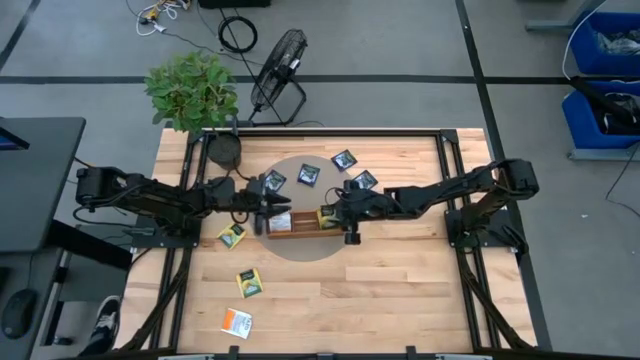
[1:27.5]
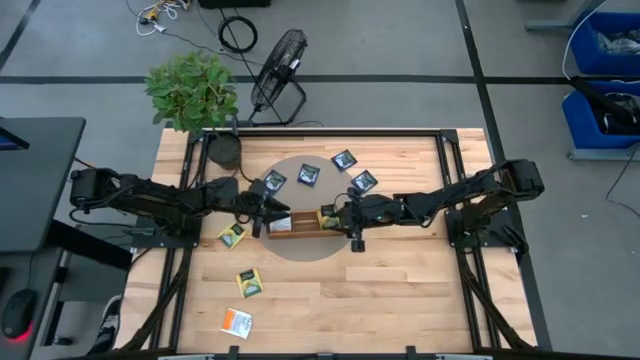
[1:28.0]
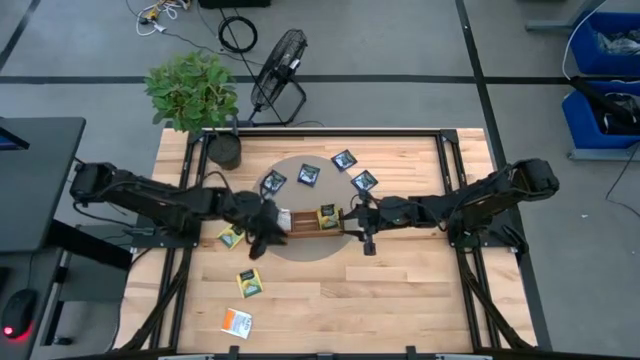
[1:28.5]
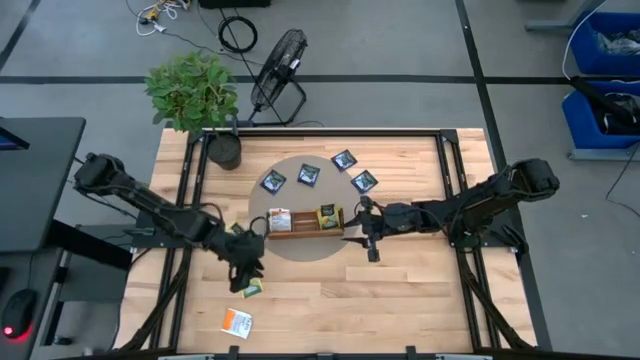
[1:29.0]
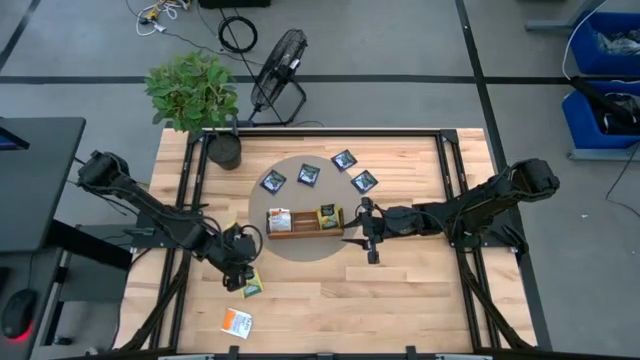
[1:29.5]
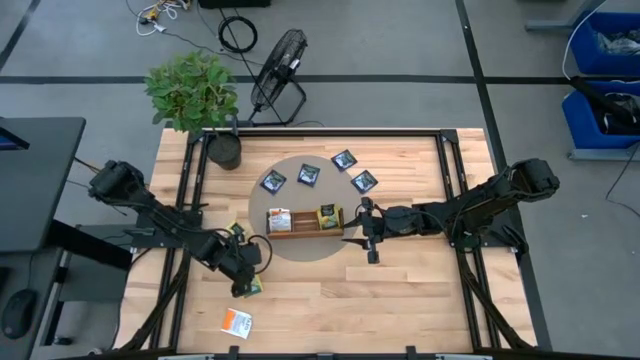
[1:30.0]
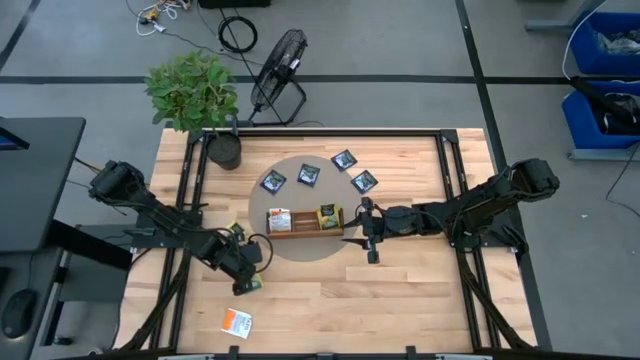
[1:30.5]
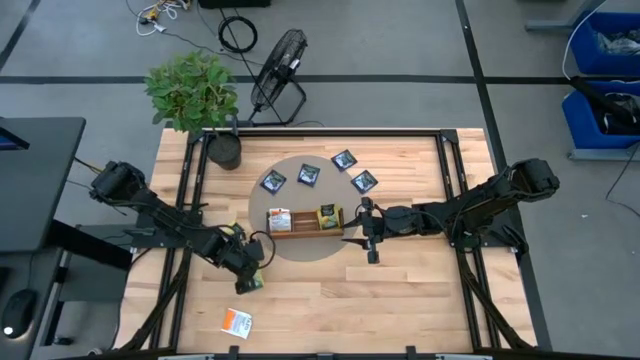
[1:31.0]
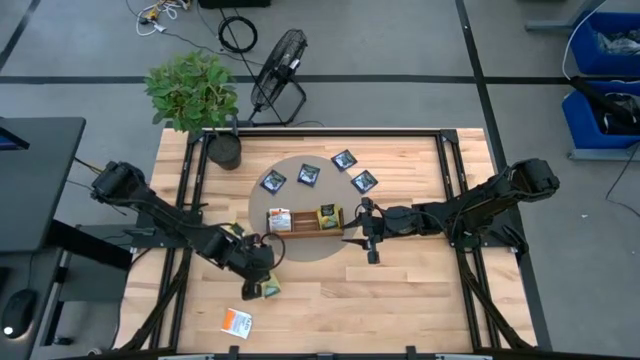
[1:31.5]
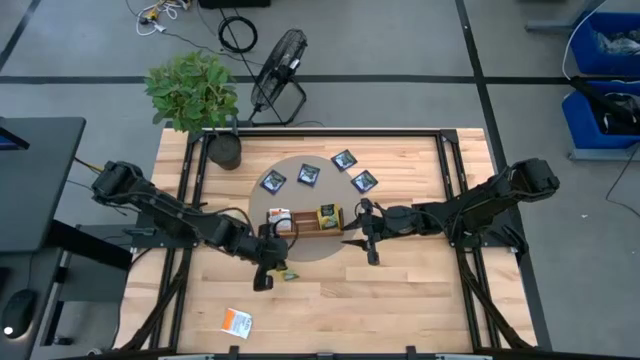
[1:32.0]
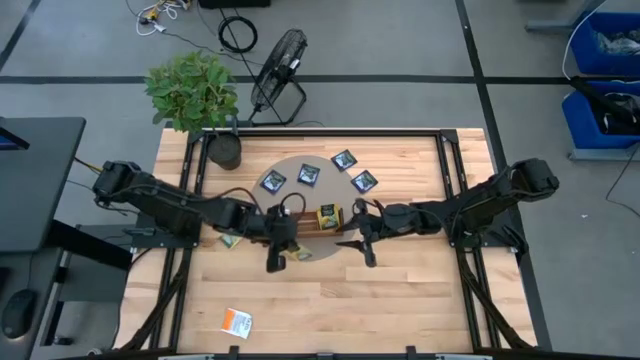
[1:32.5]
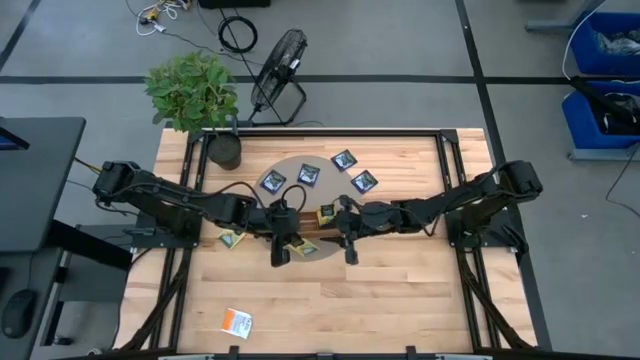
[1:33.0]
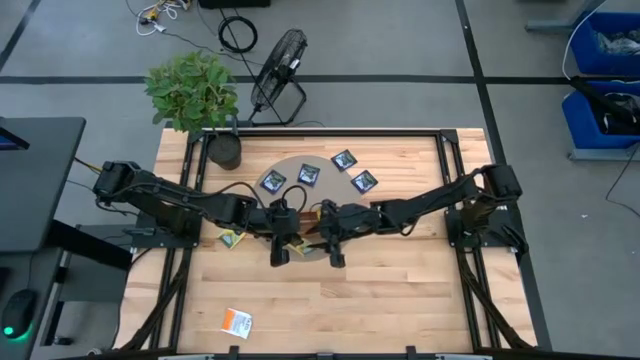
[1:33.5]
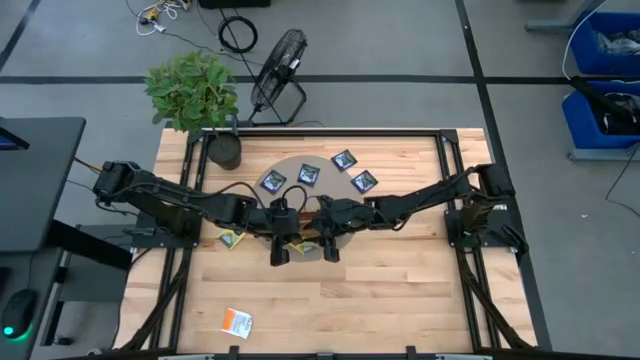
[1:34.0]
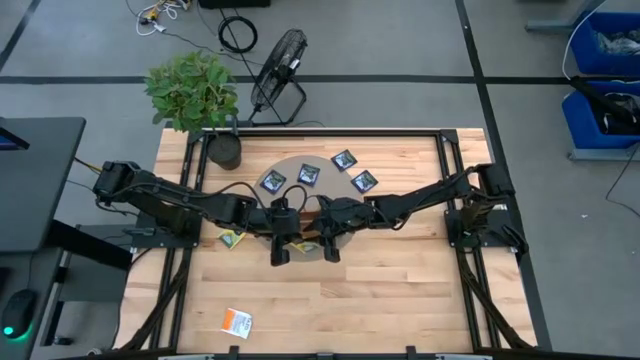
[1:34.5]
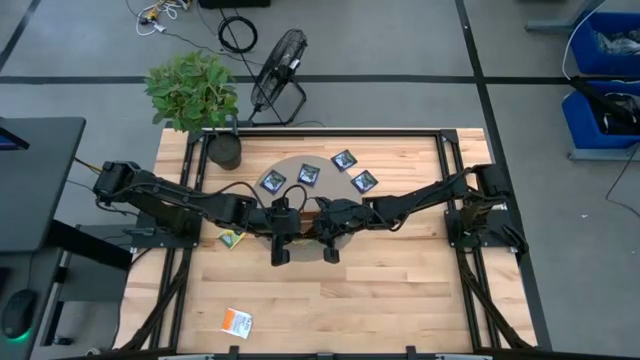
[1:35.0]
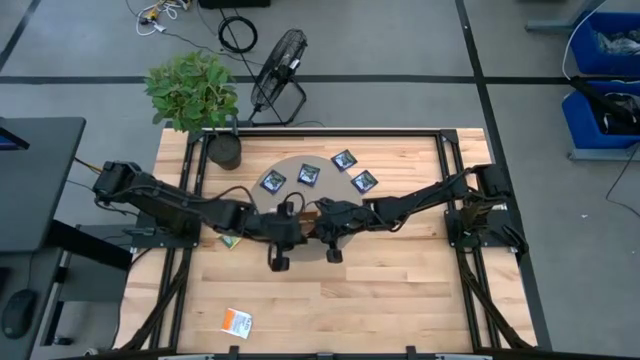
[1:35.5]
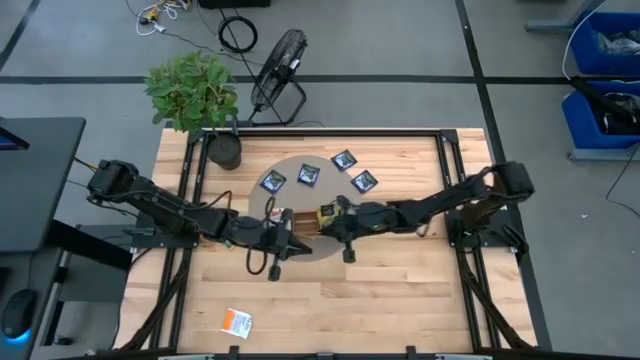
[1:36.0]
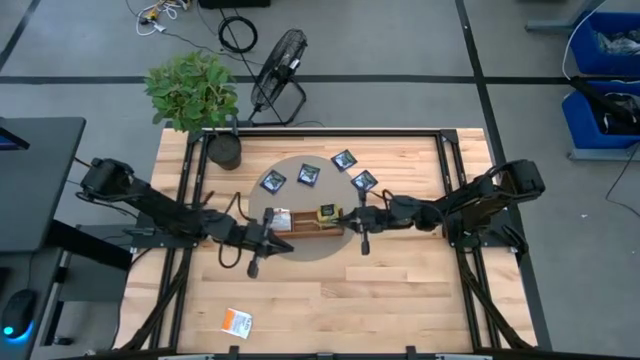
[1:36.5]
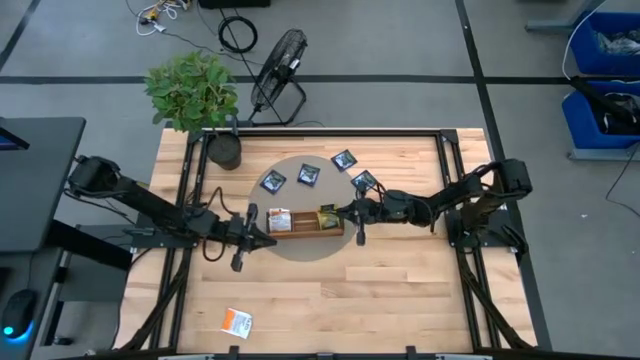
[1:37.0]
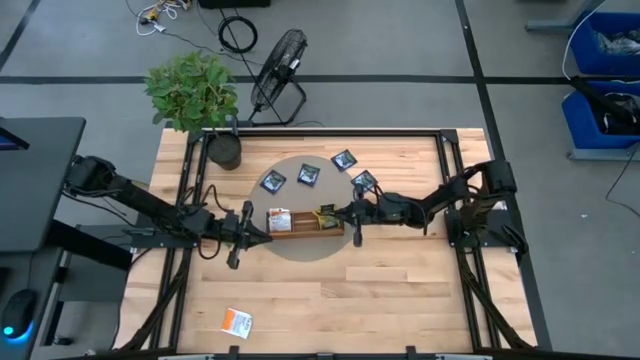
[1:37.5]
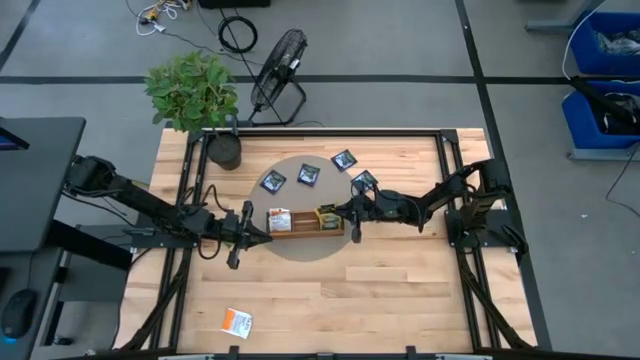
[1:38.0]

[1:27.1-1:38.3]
Task: Pick & Place Tea
Put the bottom yellow tea bag into the right compartment of the wooden organizer

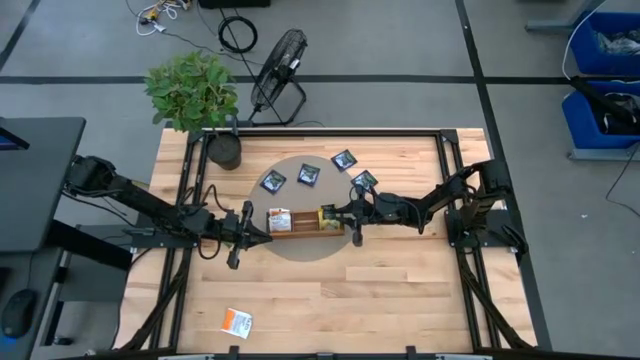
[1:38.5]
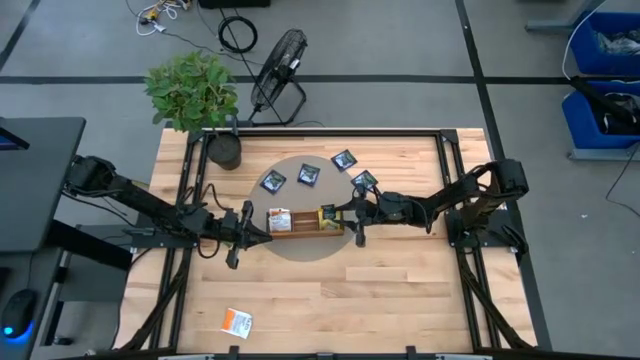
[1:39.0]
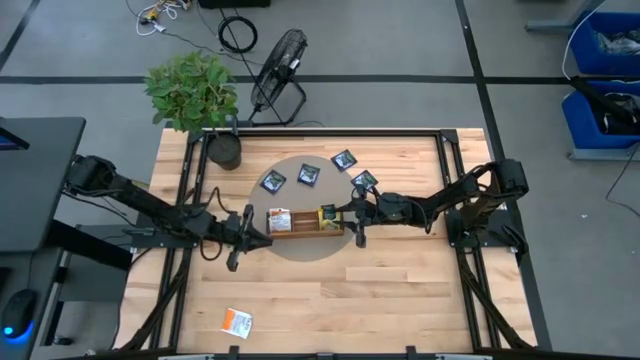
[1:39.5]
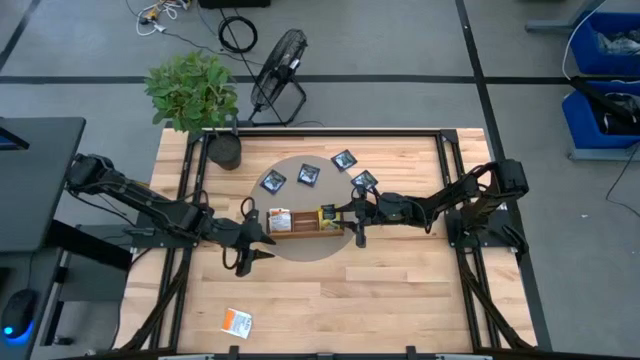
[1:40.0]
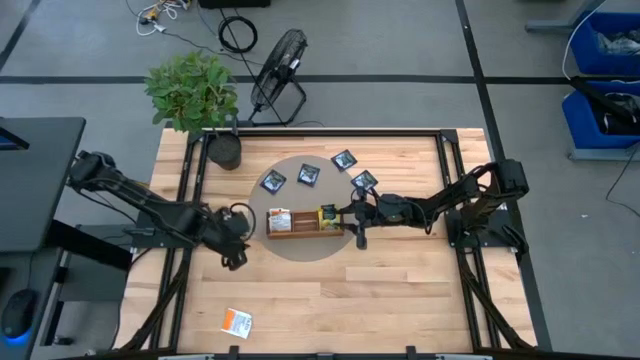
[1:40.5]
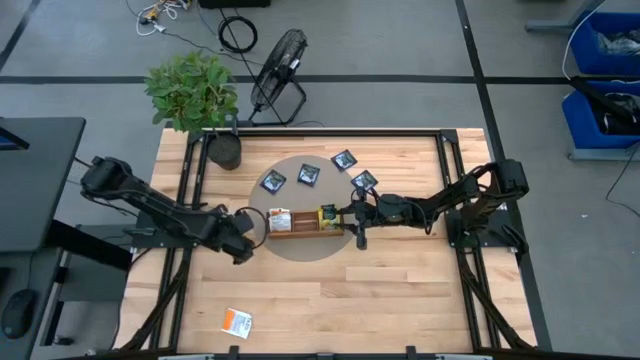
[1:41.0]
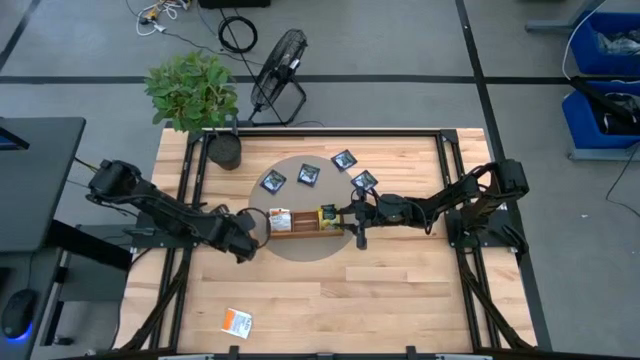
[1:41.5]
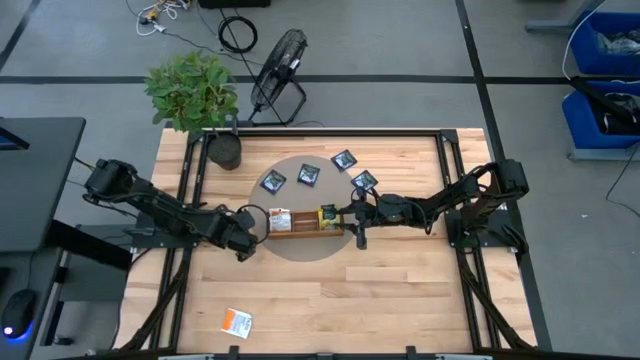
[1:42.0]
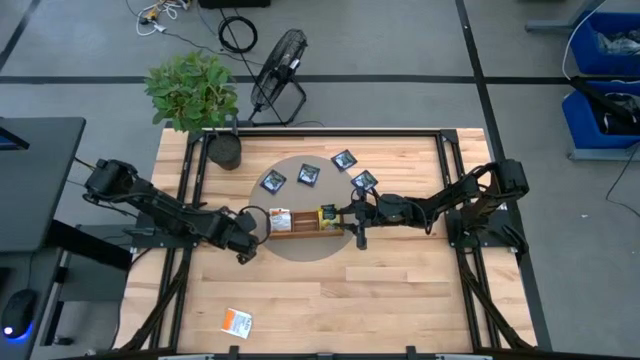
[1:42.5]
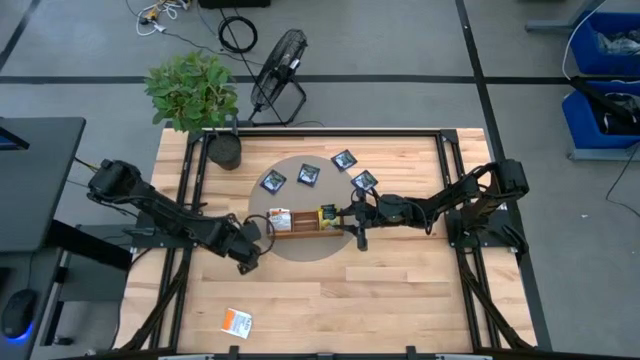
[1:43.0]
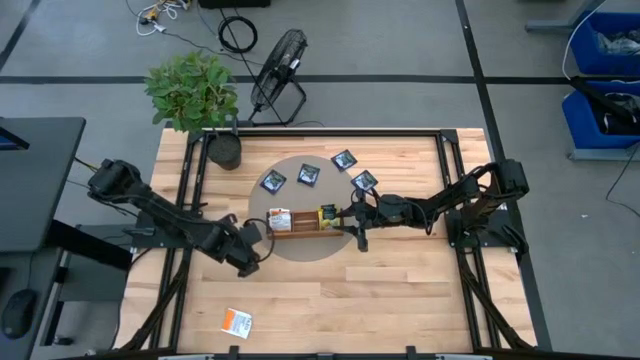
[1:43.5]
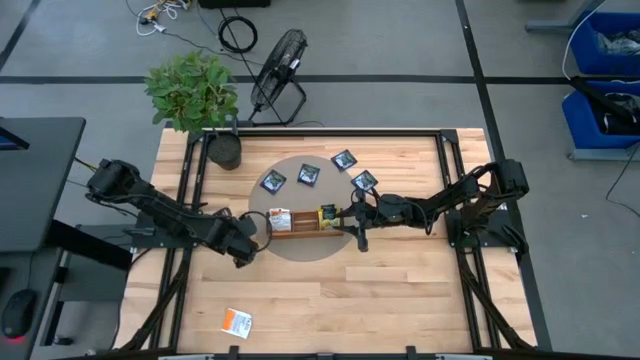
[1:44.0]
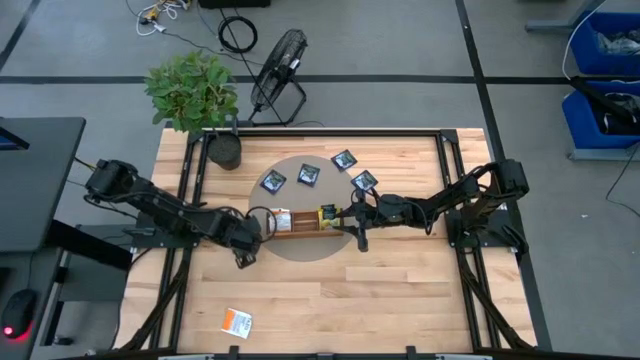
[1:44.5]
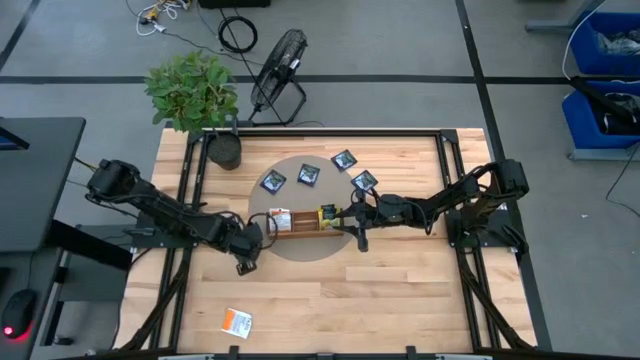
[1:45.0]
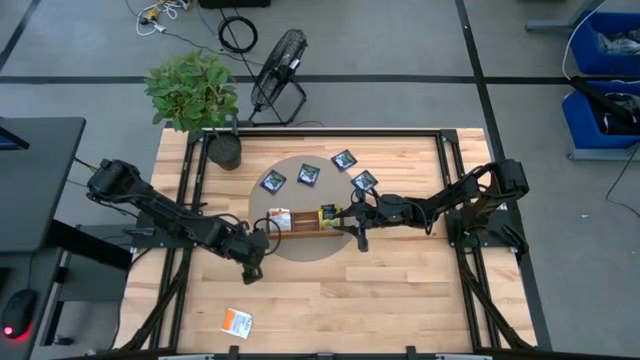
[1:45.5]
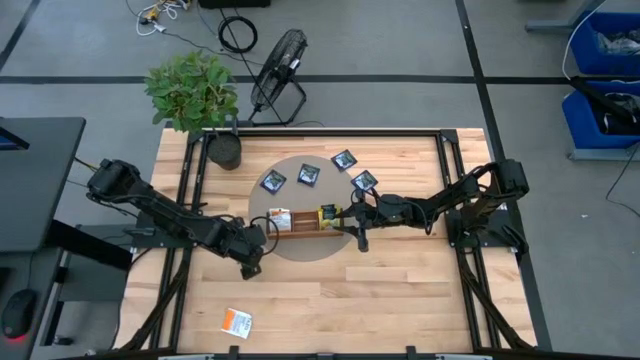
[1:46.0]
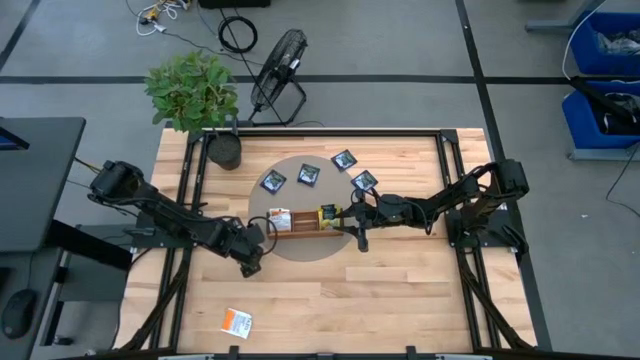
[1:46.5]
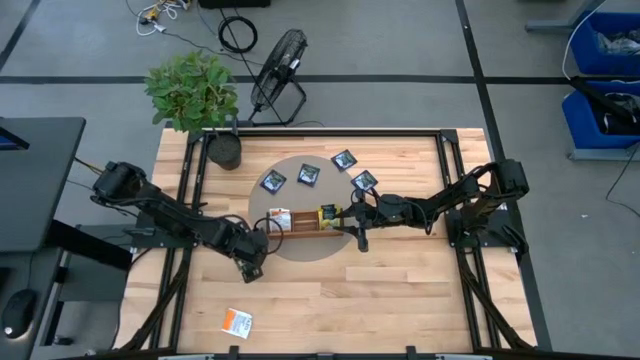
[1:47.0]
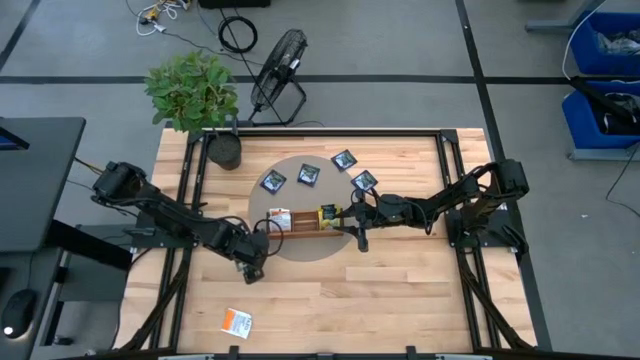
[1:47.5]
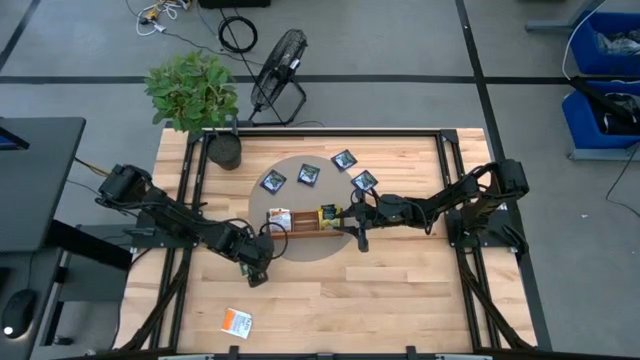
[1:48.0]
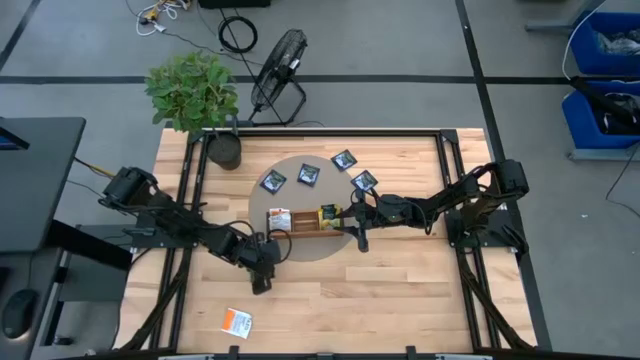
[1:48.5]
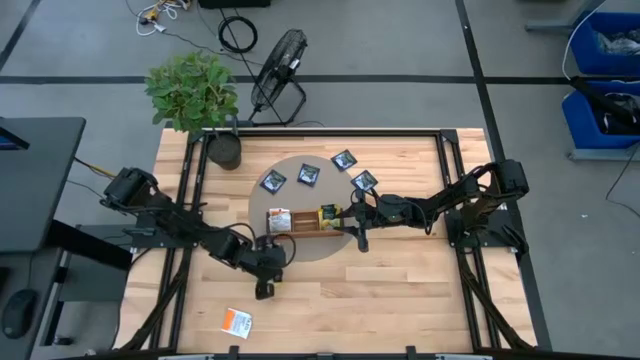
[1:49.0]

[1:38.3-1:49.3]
Put the yellow tea bag into the right compartment of the wooden organizer
